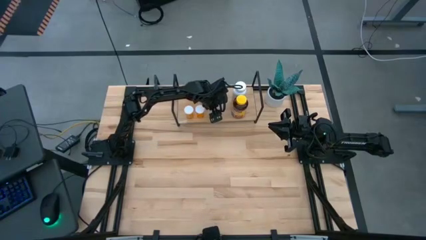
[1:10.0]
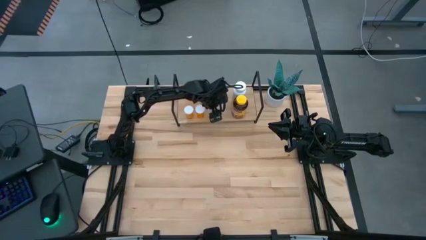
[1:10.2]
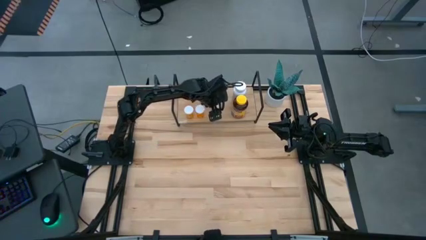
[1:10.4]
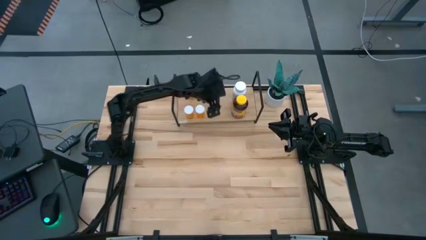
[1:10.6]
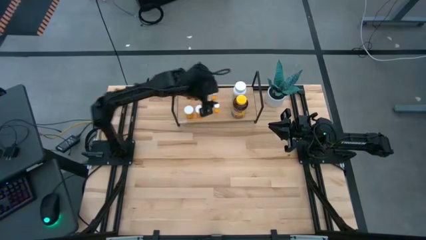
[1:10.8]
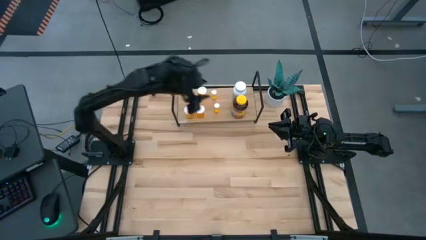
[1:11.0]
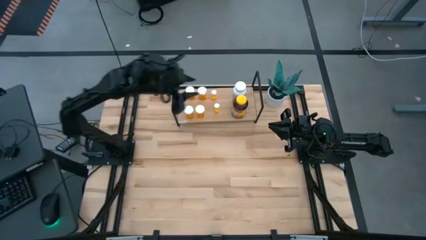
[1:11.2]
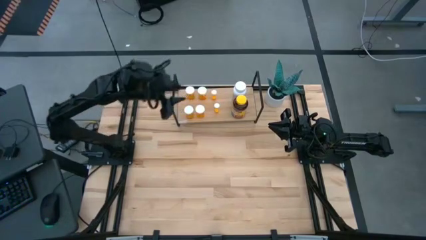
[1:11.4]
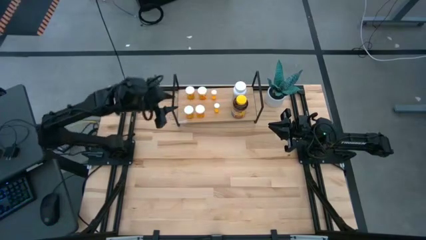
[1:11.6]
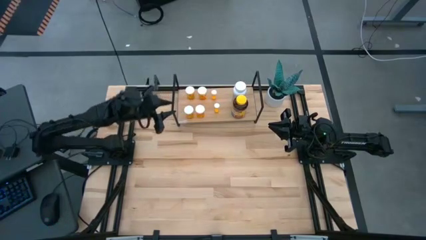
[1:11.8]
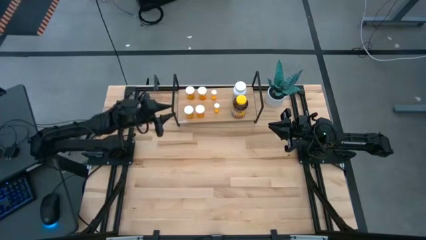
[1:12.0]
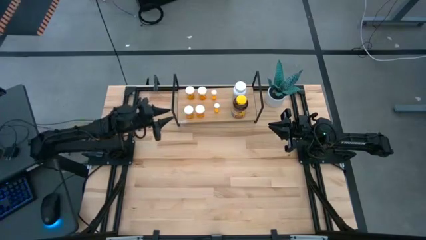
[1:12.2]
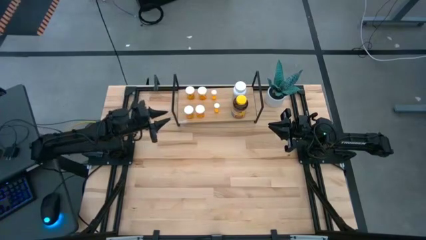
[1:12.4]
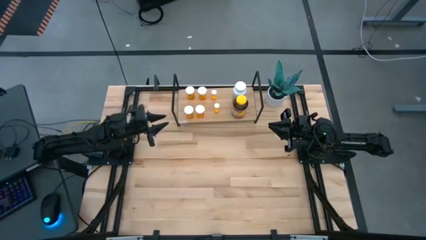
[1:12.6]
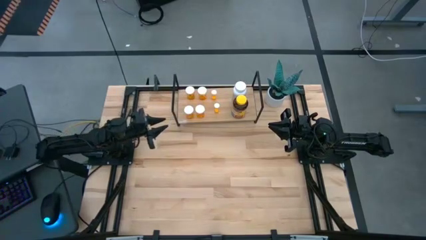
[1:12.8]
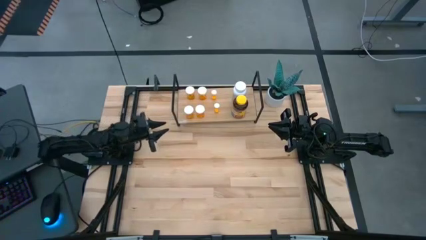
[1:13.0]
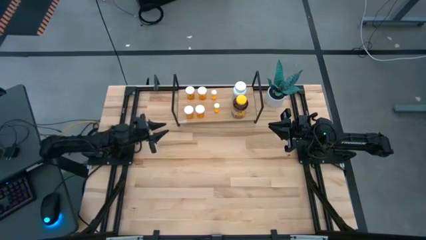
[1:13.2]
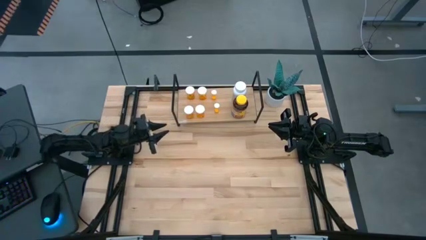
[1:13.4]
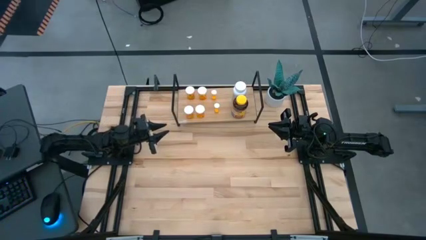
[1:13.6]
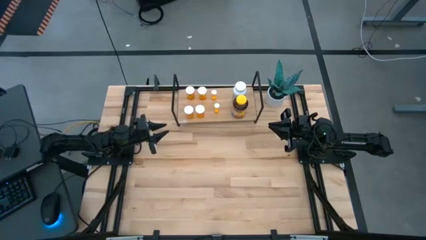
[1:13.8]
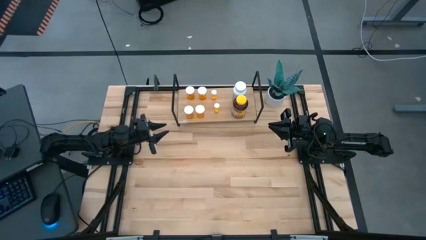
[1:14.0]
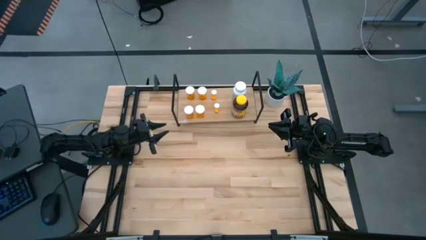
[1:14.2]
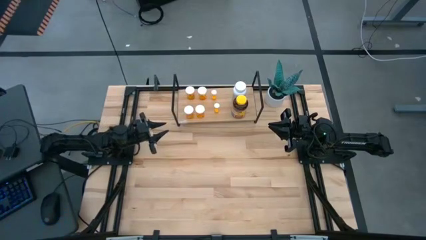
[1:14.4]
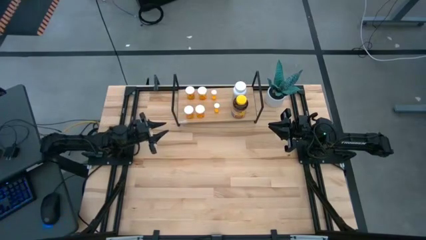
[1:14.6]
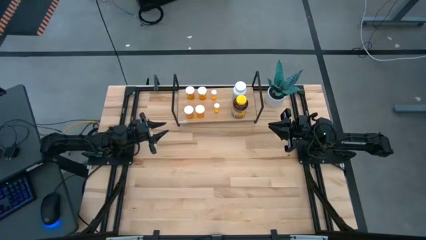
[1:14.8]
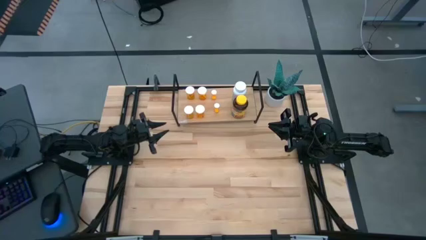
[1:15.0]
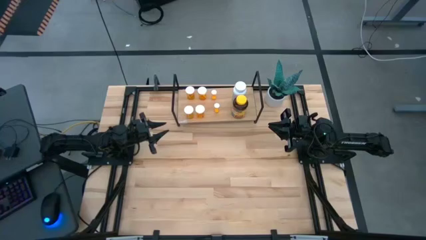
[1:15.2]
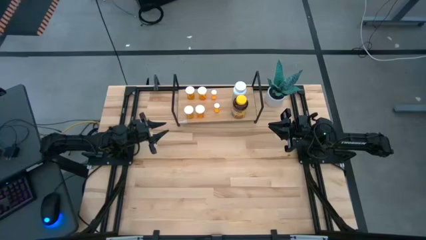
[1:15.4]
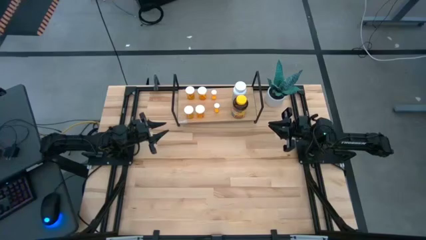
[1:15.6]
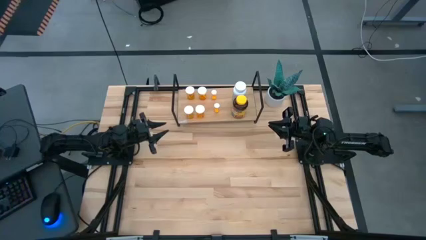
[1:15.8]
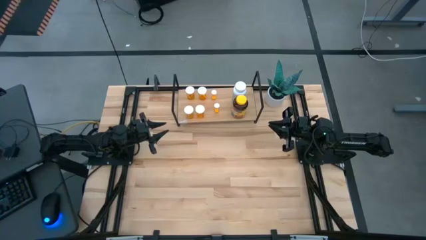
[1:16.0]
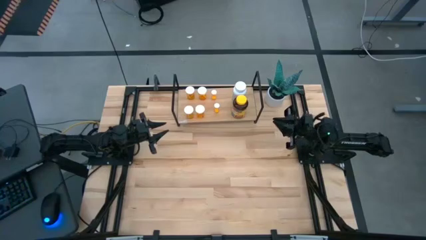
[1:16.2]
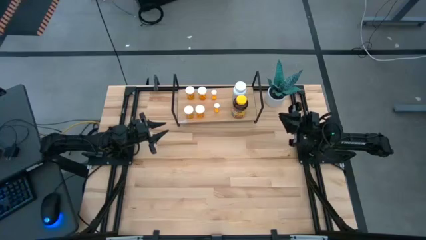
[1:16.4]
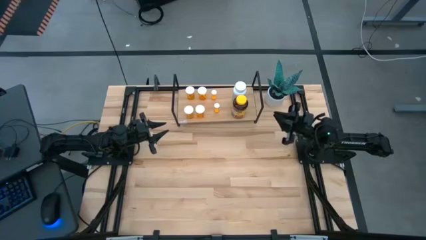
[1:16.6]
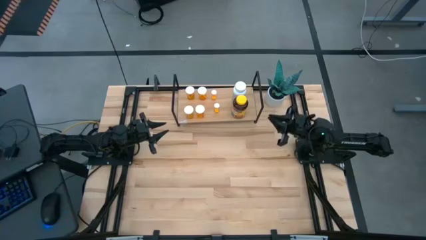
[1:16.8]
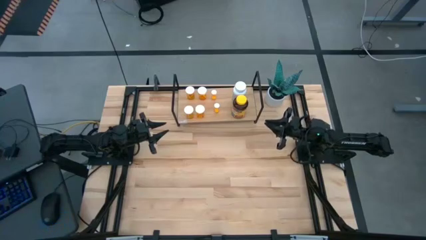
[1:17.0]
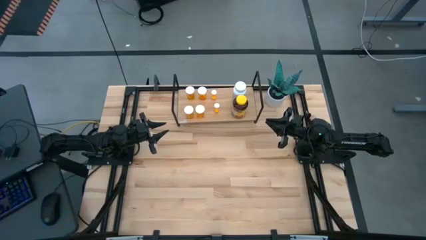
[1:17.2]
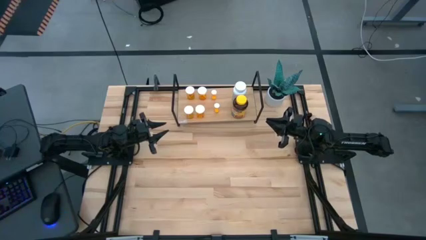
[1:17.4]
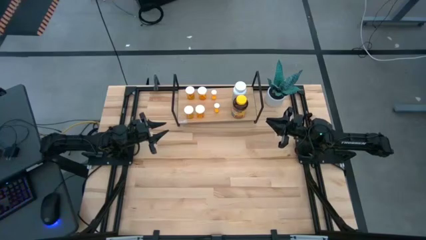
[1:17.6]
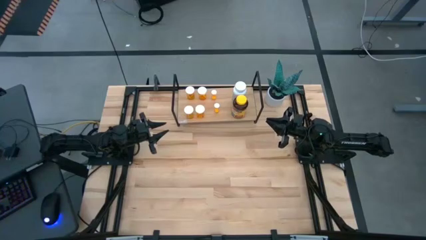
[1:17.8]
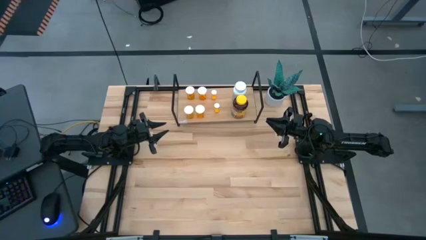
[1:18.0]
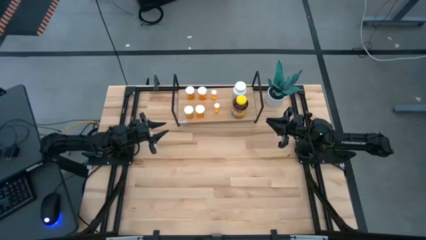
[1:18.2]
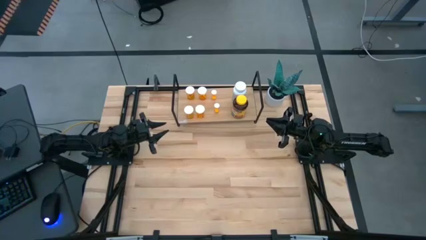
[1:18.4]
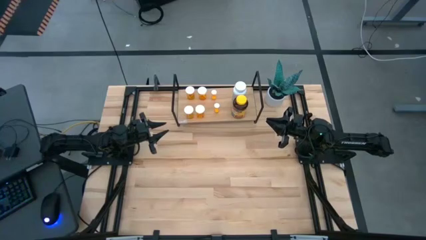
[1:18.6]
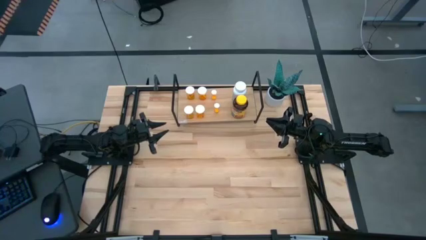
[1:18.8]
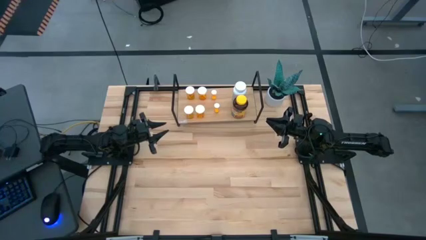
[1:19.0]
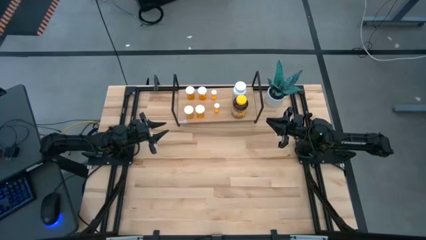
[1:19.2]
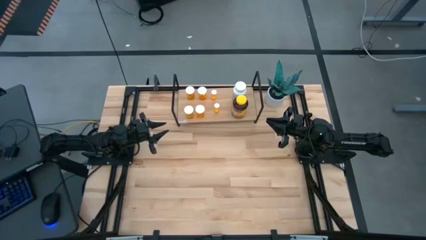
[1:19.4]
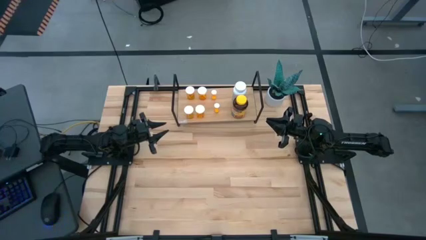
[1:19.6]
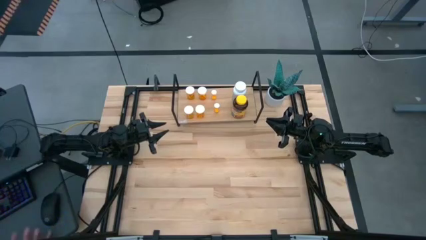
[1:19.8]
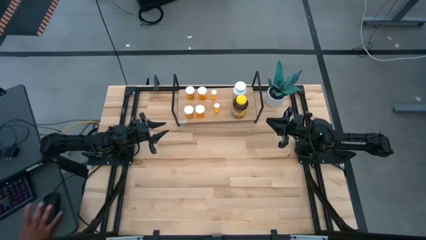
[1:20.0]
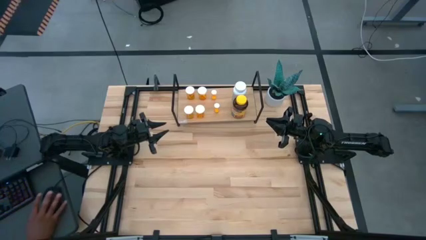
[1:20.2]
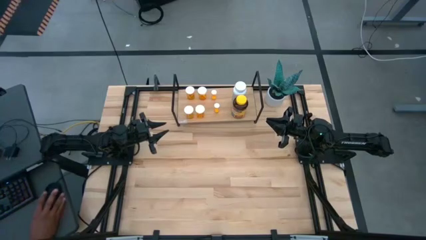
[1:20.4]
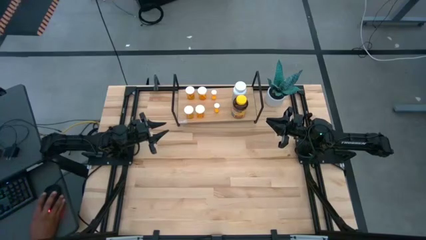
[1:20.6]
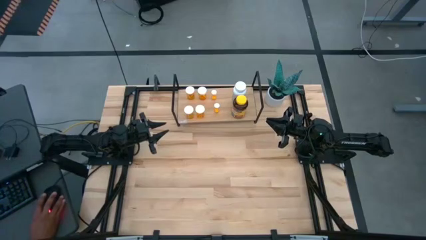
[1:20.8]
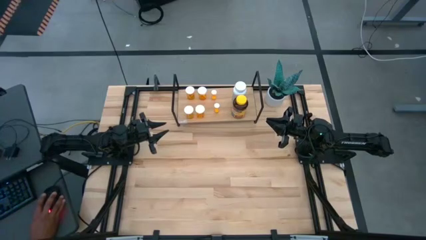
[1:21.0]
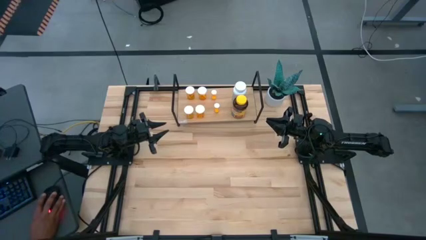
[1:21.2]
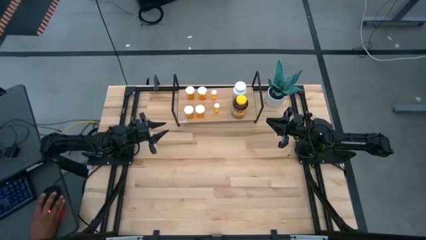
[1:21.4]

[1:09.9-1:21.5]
Task: Pick and place medicine bottles onto shelf by color
Return to Home Position

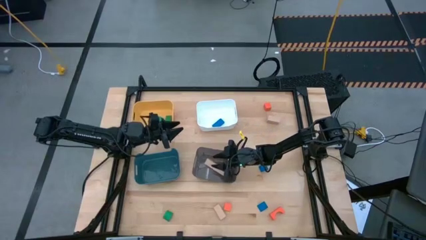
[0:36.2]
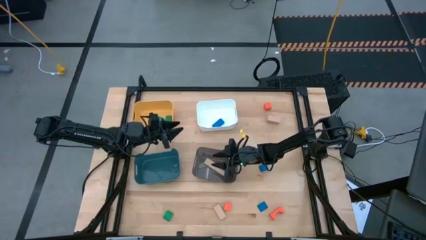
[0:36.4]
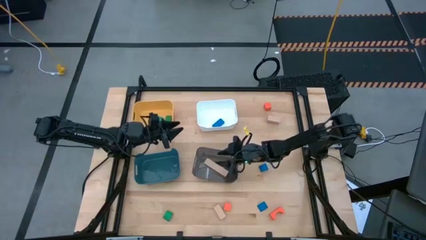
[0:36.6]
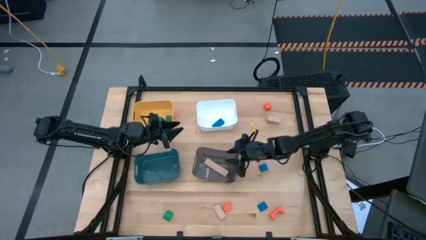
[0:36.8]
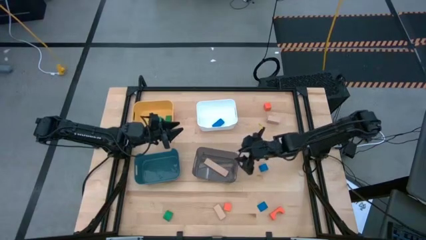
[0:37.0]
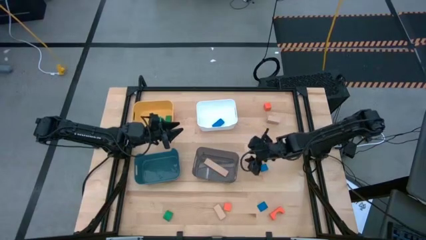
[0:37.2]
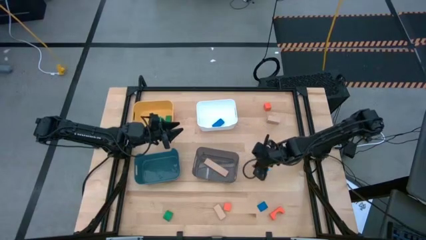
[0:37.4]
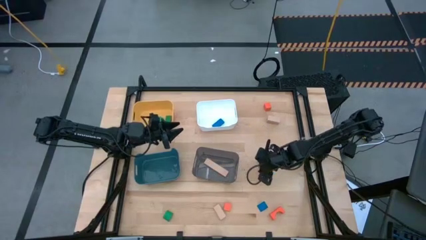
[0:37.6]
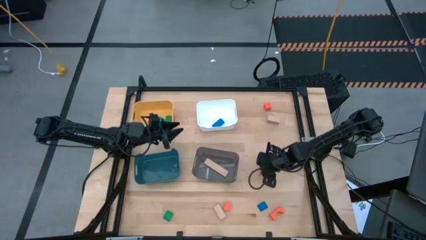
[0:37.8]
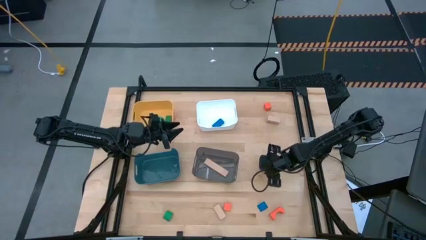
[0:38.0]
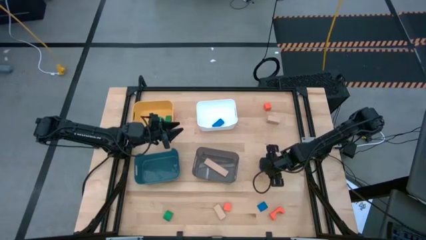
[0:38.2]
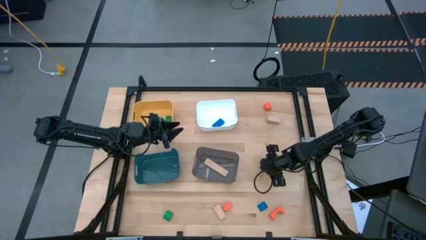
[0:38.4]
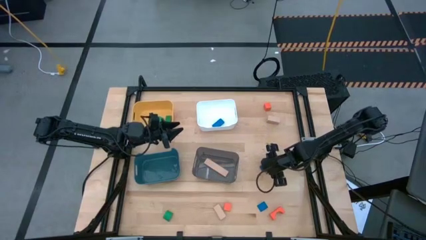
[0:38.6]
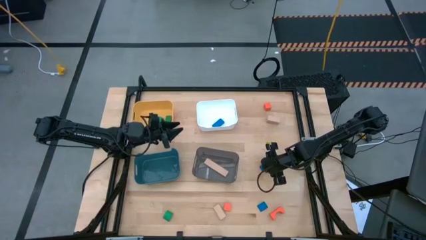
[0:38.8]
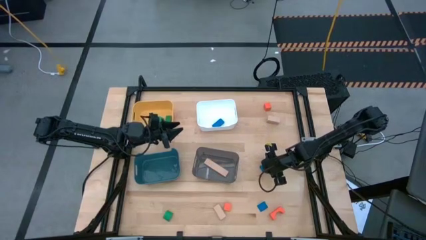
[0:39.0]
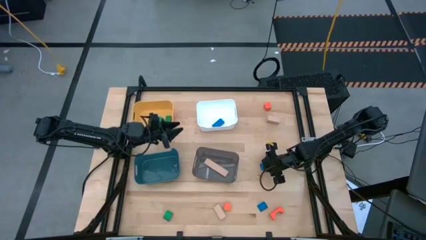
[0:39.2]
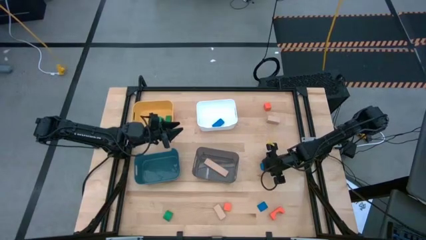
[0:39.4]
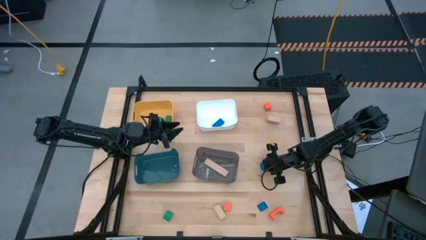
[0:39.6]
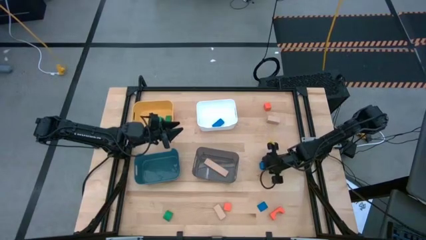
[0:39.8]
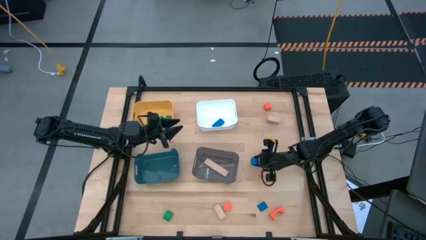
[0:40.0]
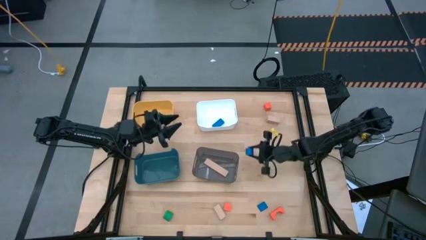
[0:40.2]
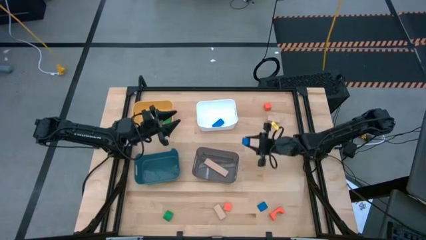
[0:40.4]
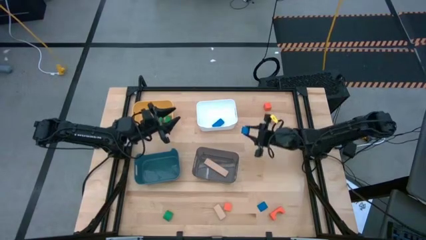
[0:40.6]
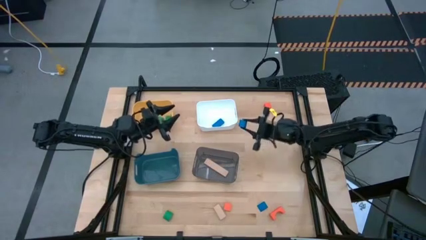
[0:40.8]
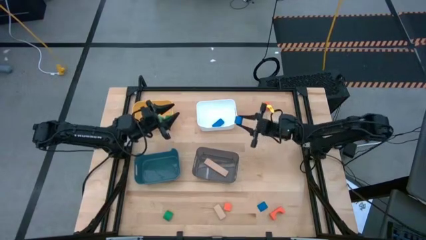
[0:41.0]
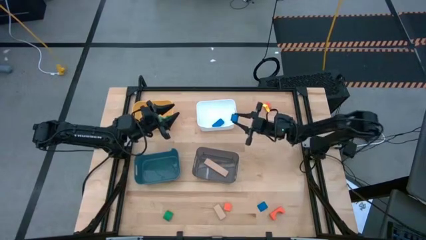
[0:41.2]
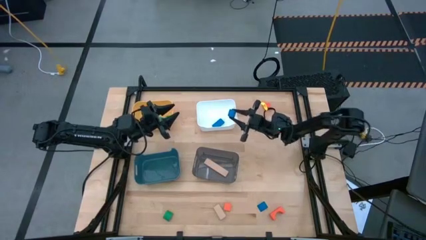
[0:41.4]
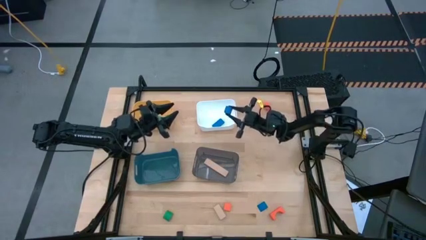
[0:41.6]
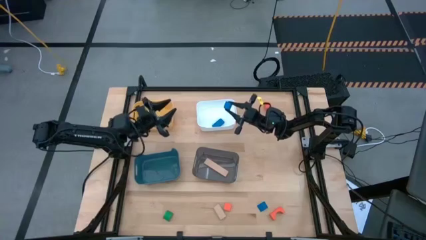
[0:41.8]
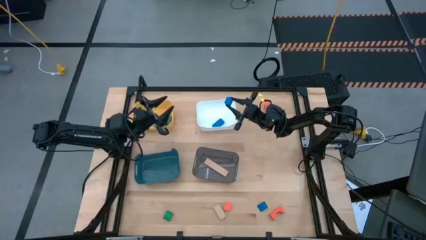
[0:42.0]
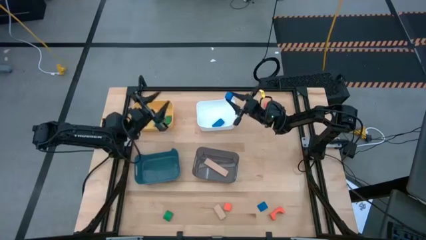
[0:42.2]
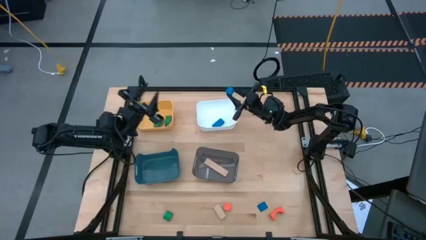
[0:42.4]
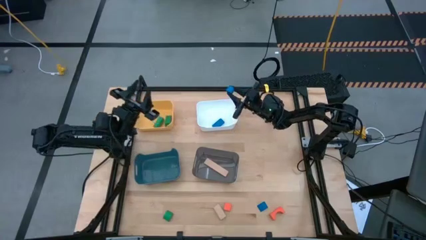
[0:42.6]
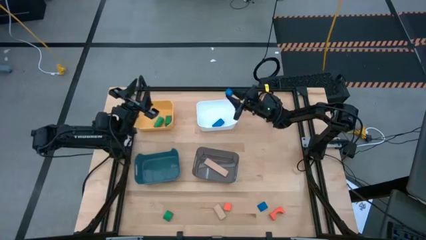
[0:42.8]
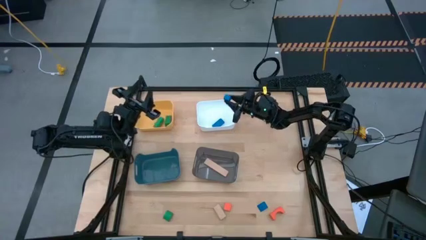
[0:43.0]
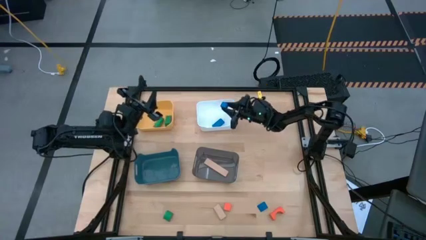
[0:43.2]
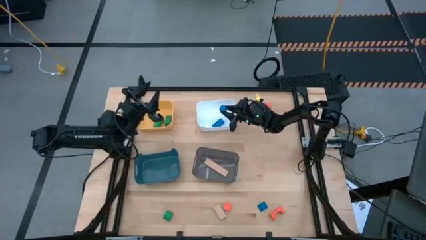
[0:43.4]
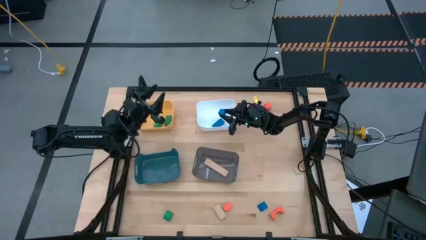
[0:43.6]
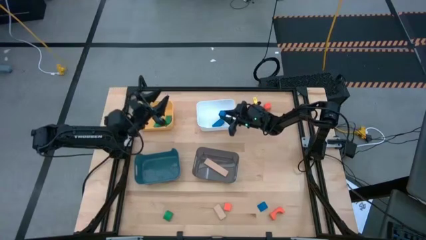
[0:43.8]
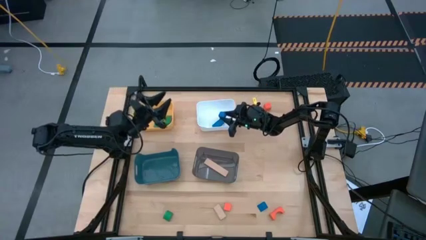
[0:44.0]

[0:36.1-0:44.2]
Task: Sort & place blocks by color
Put the top blue block into the white bin
